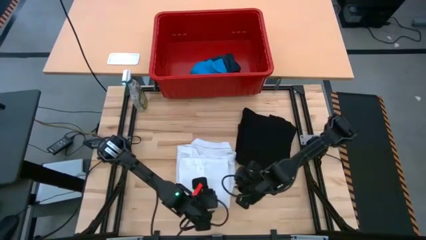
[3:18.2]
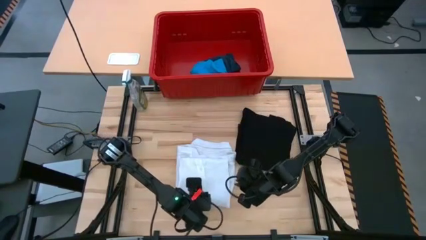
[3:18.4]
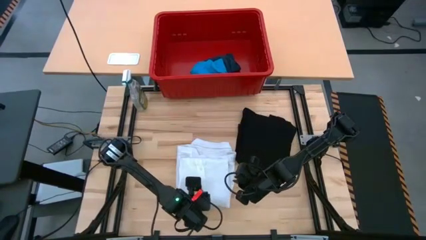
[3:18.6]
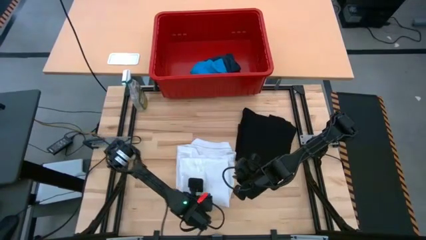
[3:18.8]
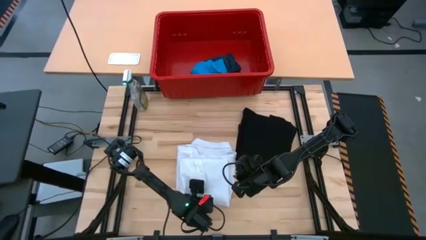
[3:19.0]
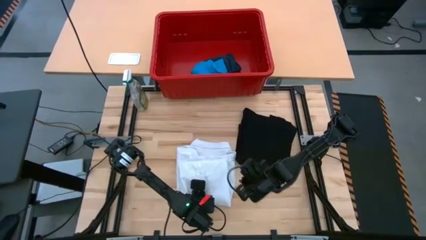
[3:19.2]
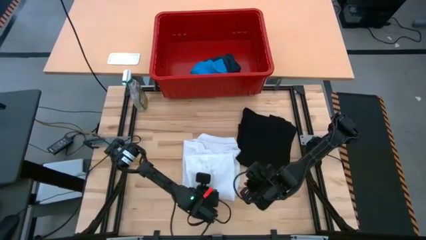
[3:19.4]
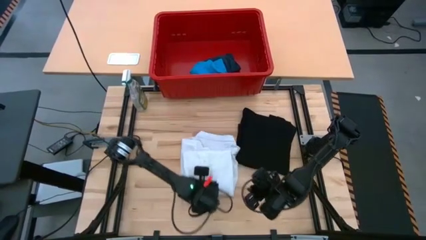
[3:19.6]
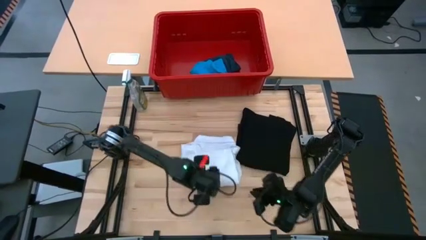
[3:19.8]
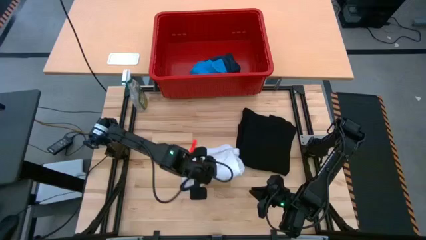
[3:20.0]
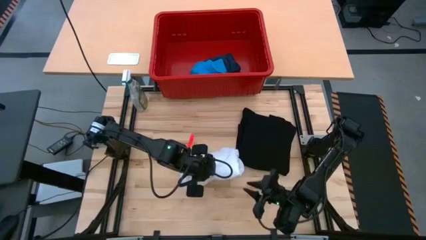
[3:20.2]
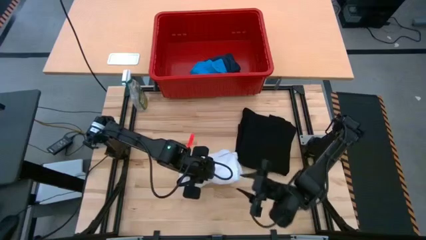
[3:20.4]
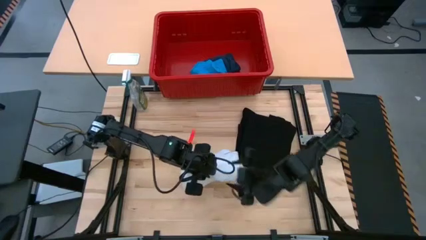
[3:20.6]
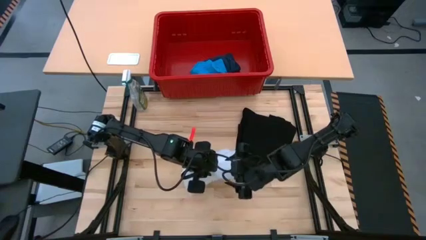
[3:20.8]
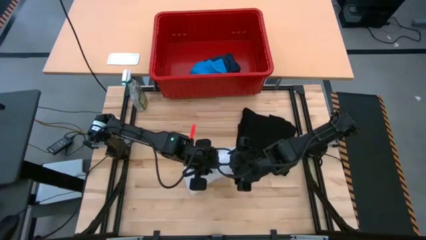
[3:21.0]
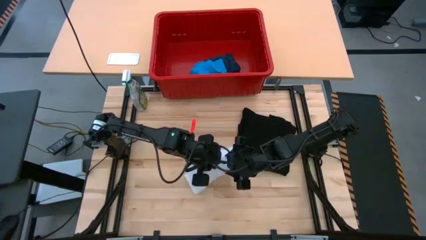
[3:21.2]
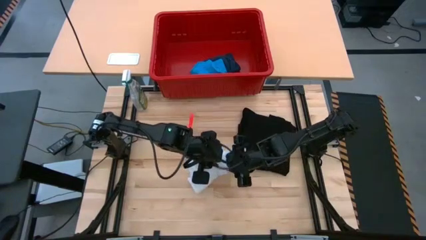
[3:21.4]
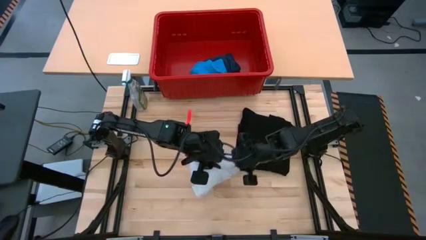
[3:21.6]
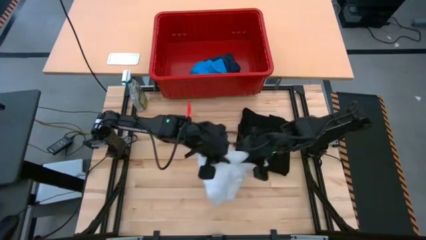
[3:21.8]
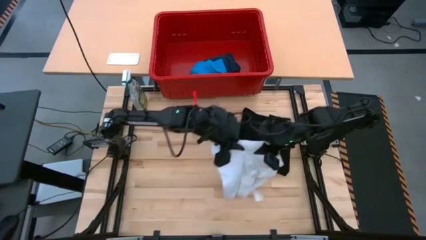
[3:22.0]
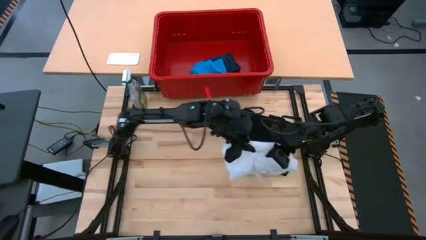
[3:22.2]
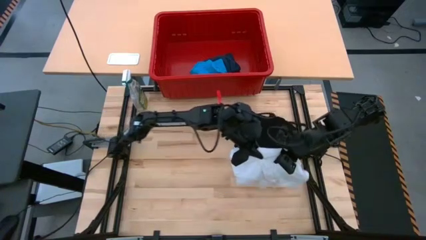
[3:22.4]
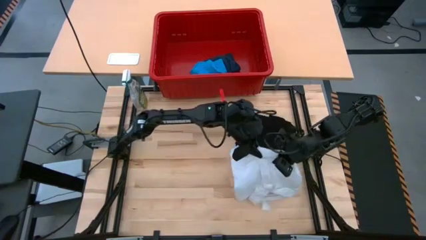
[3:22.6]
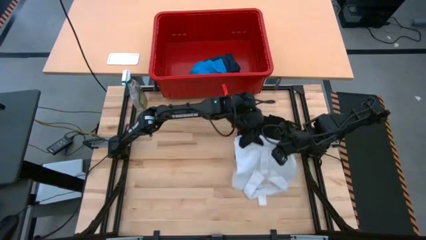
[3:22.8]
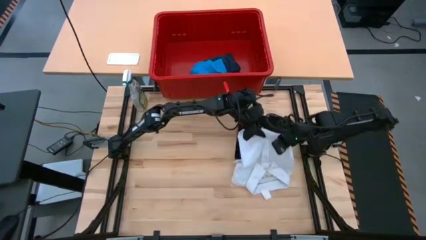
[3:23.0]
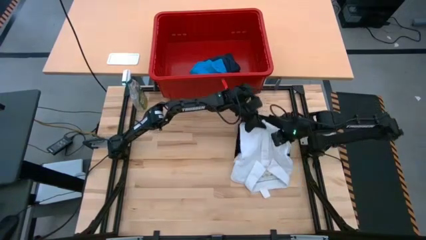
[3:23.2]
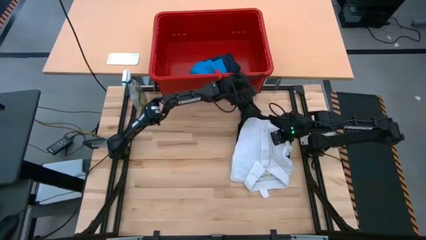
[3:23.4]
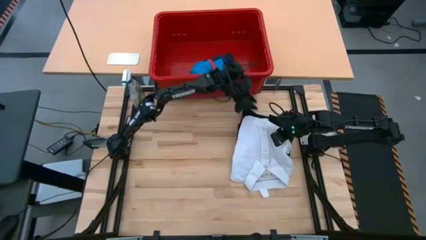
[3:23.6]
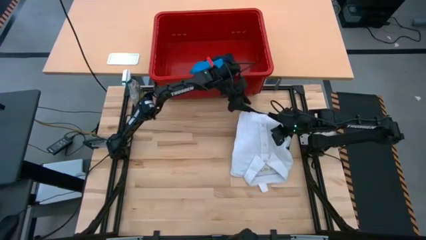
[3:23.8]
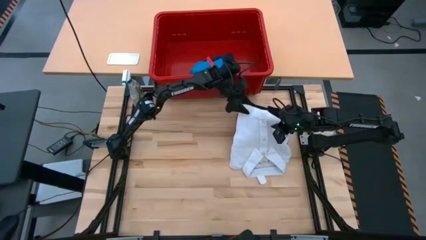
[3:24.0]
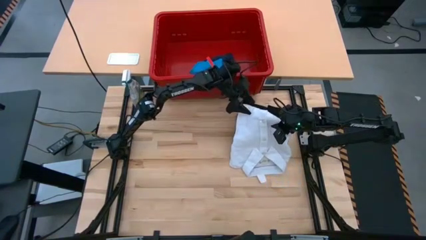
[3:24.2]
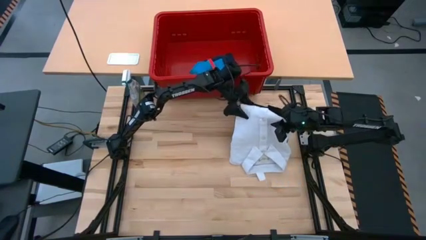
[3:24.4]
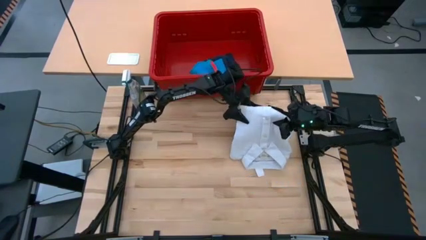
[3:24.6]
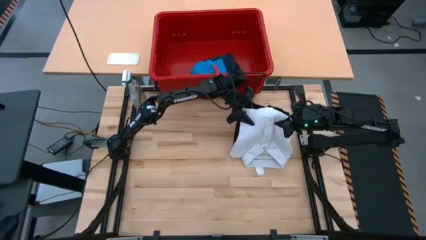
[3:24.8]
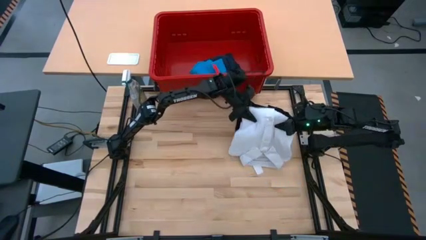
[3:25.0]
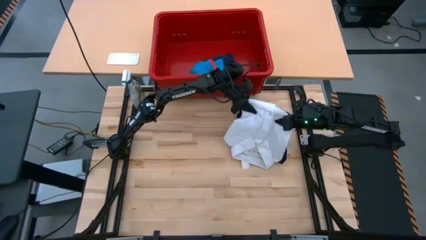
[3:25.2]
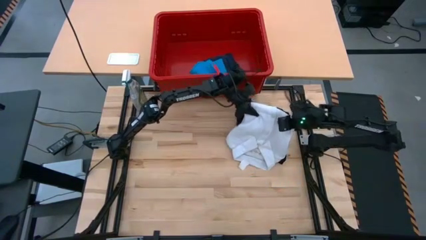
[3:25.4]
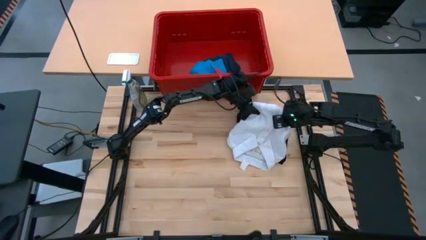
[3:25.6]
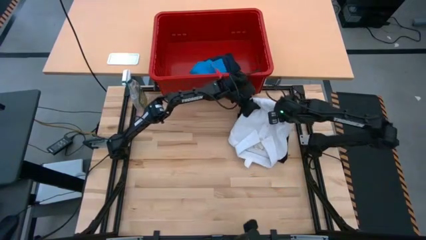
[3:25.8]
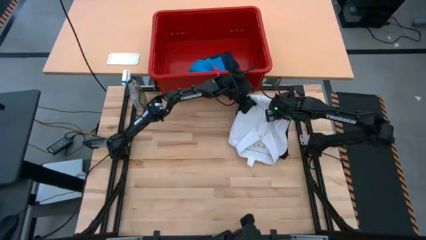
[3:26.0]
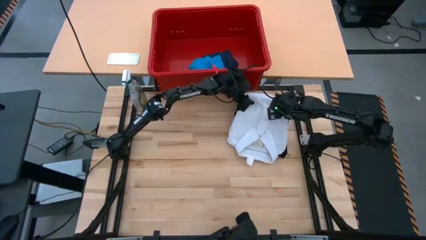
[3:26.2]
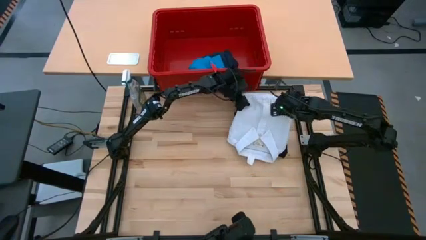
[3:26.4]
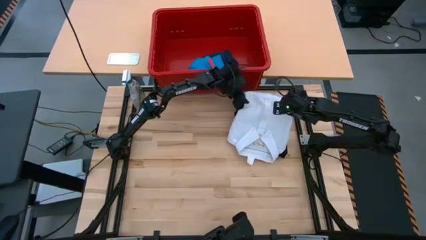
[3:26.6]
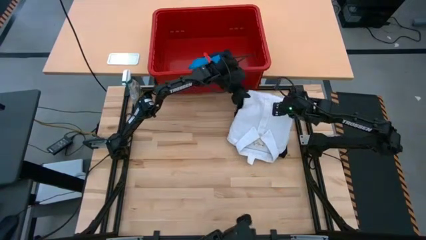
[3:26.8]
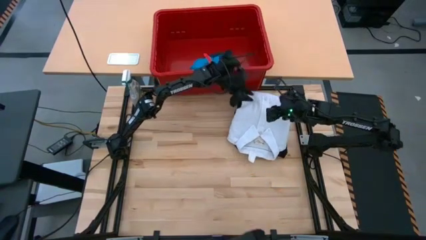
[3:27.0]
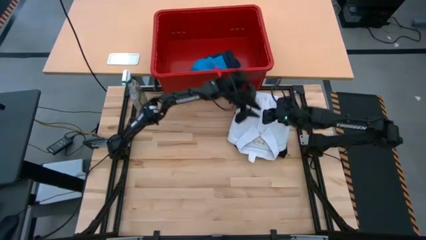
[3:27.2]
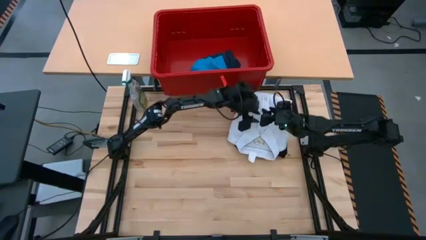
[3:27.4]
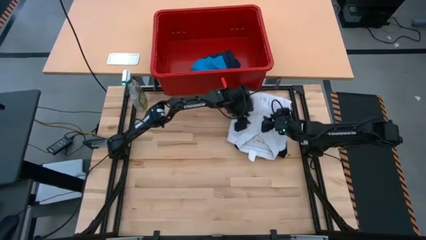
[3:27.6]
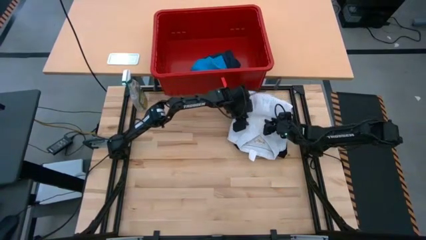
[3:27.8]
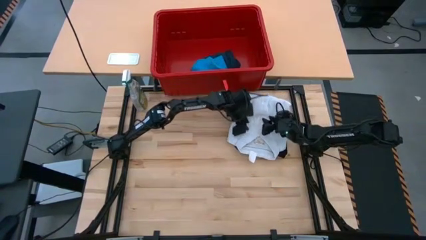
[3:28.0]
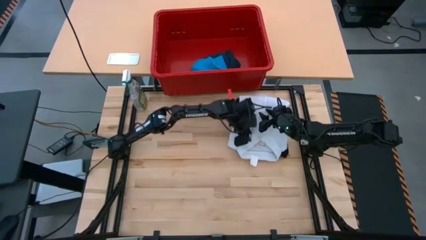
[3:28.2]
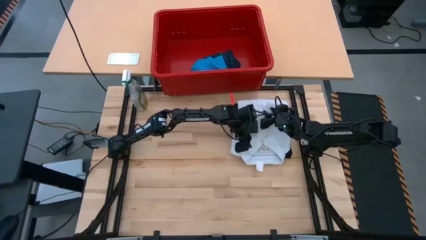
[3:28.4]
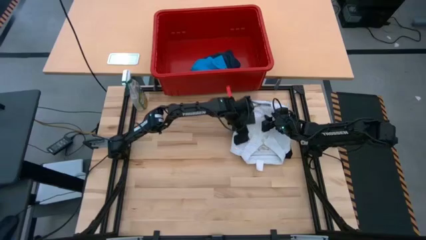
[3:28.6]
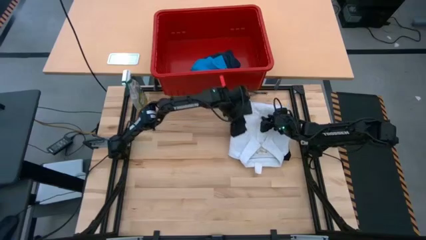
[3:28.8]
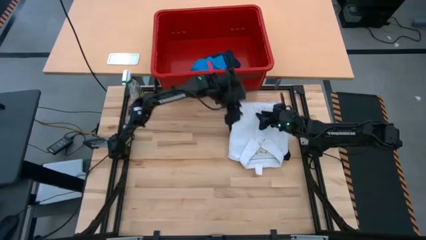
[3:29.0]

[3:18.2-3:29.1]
Task: Fold laundry
Stack the white polo shirt on top of the black shirt

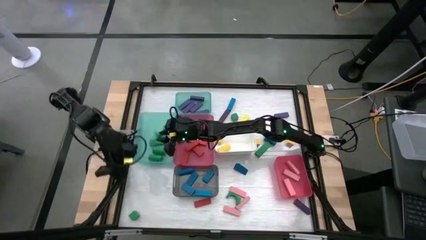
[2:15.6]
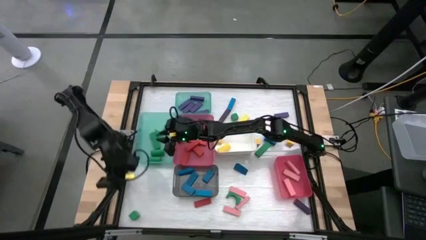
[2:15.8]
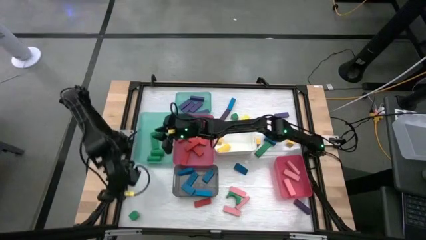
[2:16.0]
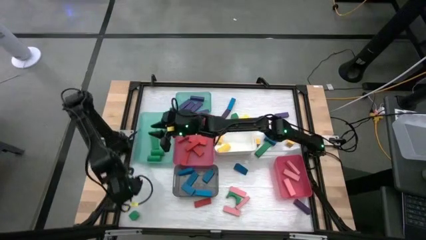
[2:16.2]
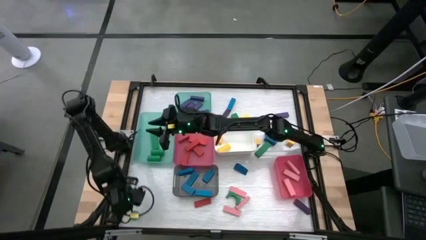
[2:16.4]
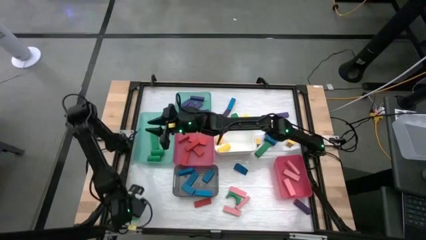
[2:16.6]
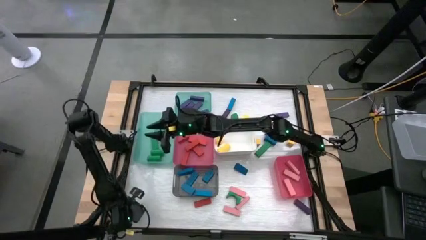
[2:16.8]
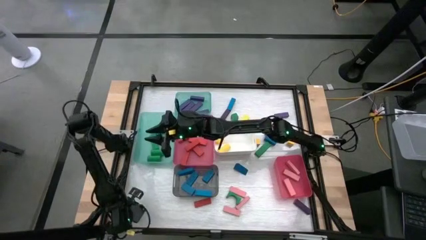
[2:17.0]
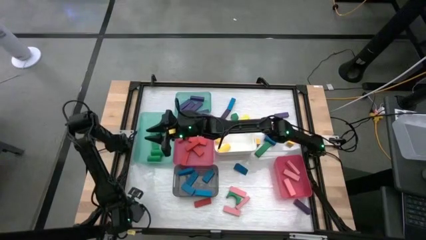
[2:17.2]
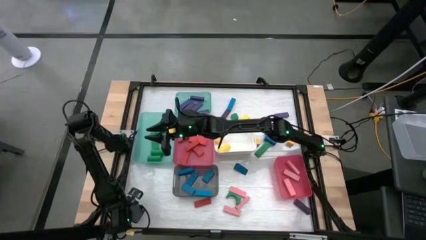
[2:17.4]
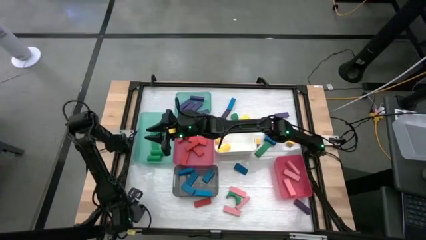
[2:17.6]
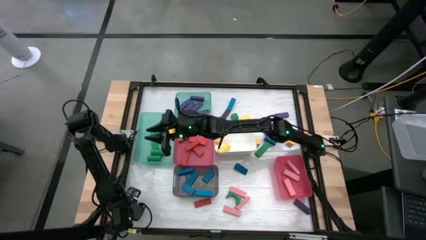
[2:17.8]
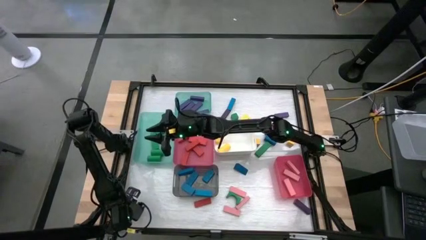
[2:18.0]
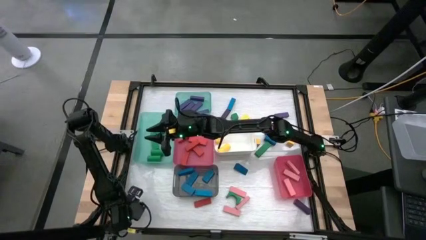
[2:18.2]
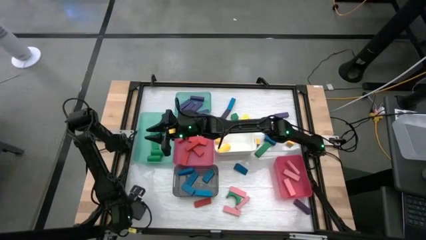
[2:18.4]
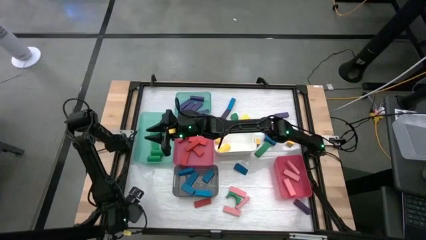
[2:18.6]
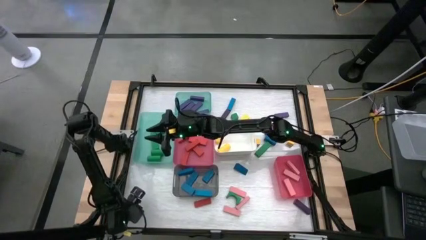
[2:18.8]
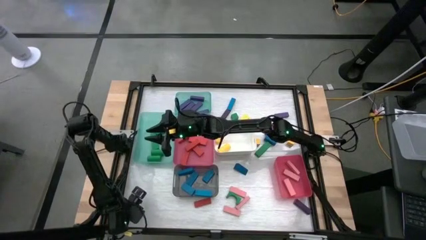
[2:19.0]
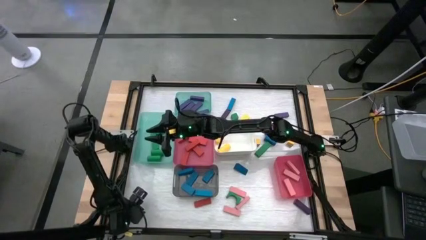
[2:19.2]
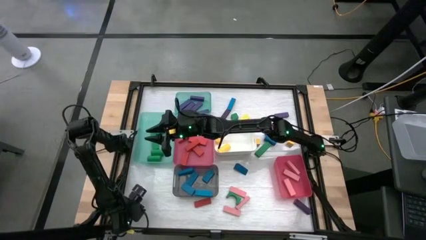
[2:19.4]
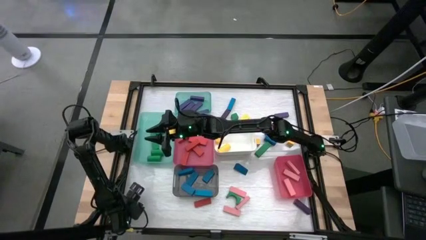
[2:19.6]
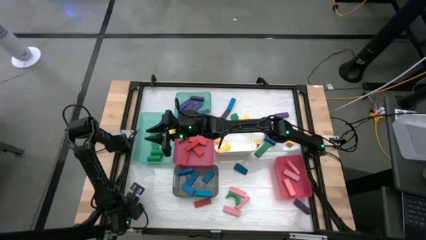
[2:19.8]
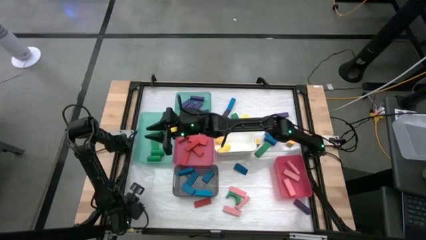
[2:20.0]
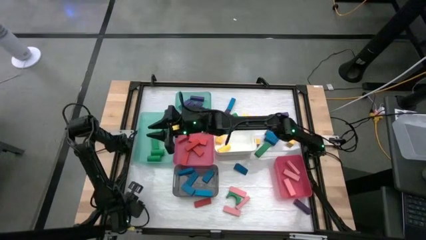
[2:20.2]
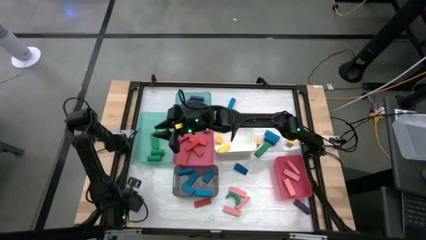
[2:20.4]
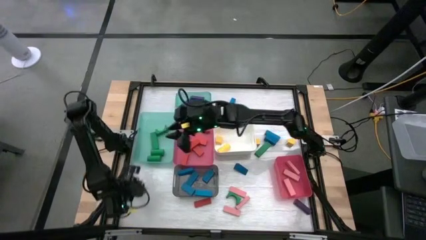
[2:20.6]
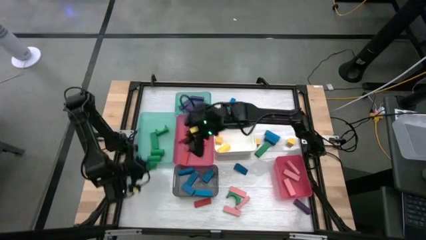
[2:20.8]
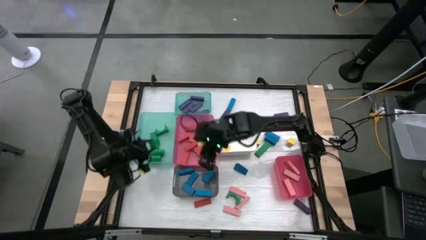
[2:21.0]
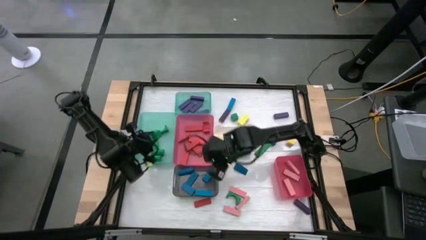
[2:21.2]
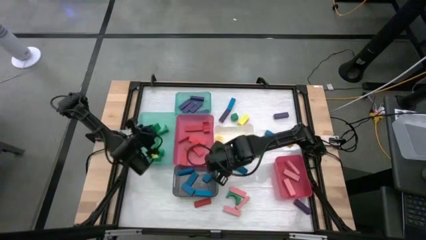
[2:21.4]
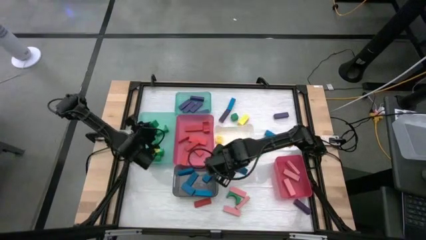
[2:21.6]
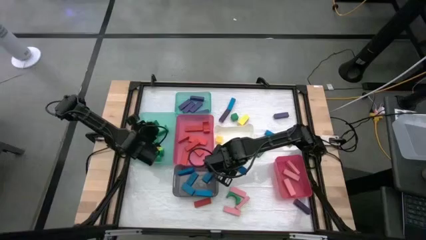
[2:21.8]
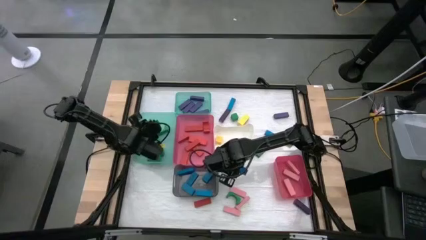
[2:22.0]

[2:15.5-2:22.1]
Task: Sort blocks
Put the green block into the bottom green bin
